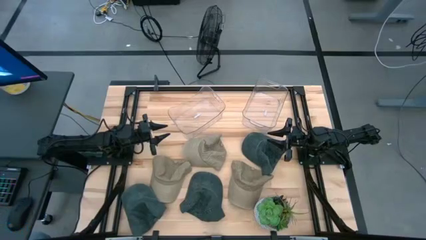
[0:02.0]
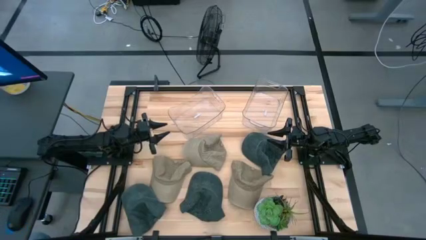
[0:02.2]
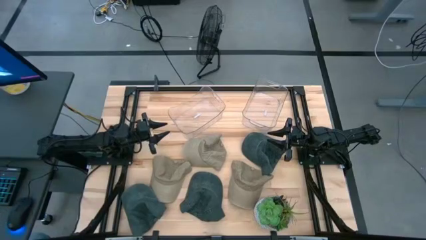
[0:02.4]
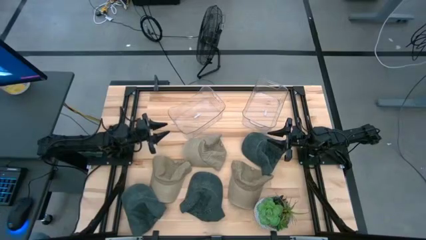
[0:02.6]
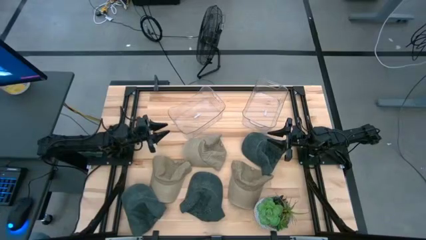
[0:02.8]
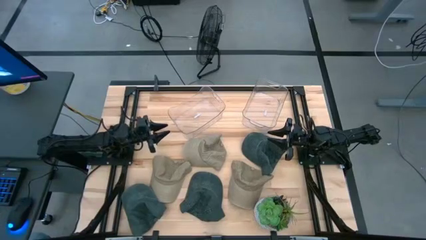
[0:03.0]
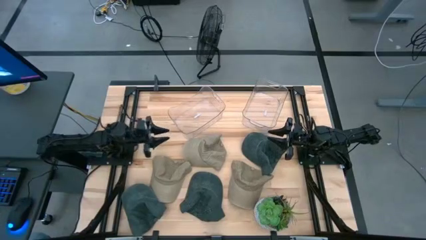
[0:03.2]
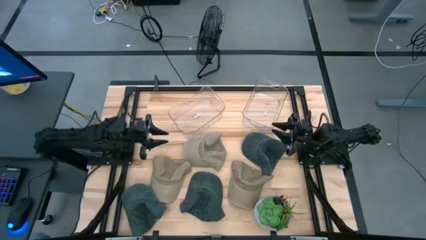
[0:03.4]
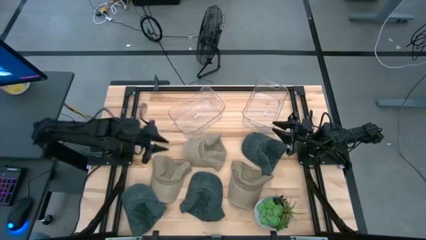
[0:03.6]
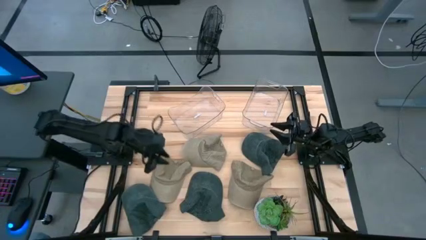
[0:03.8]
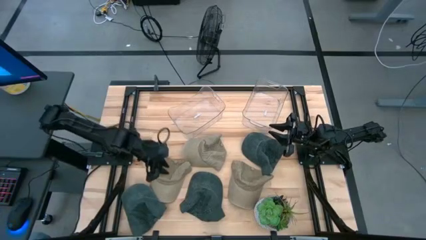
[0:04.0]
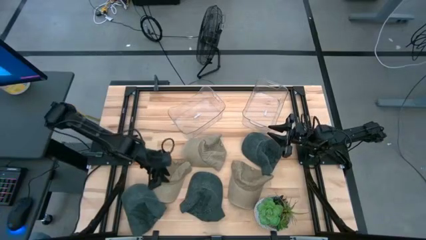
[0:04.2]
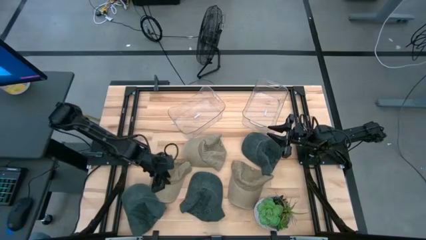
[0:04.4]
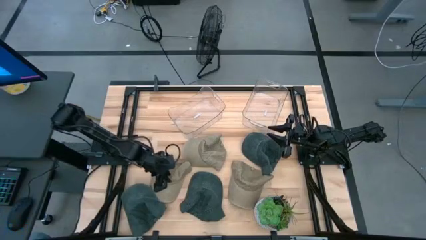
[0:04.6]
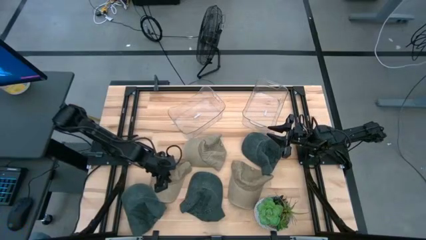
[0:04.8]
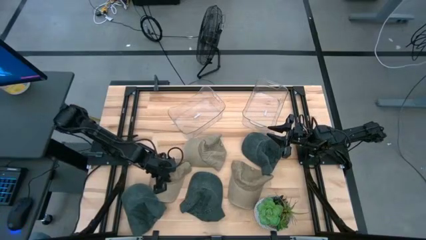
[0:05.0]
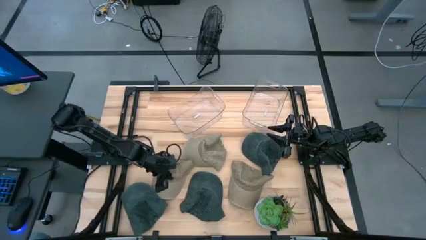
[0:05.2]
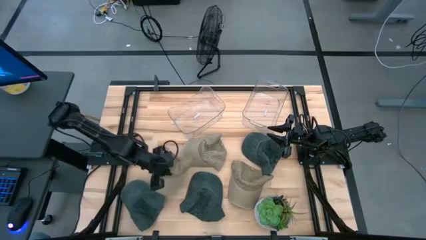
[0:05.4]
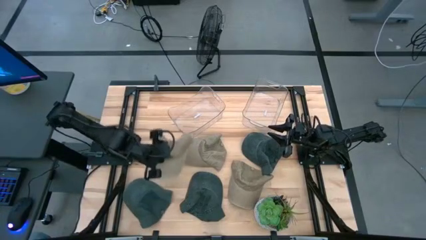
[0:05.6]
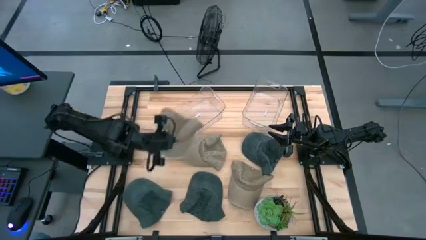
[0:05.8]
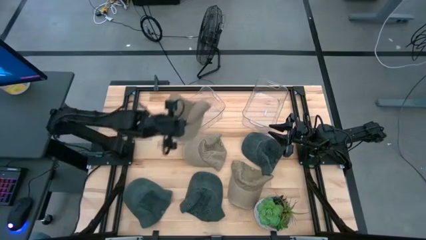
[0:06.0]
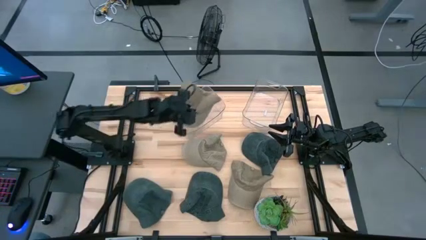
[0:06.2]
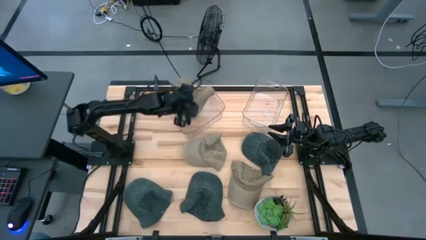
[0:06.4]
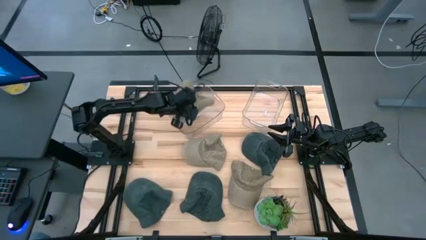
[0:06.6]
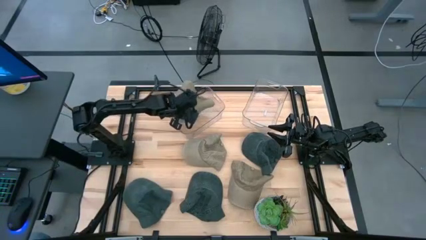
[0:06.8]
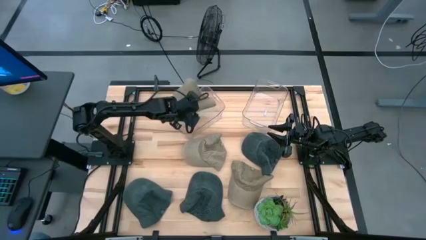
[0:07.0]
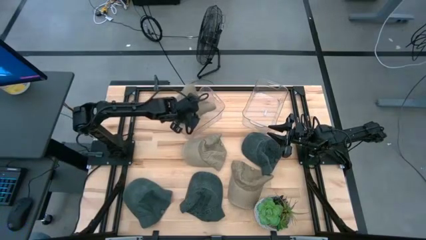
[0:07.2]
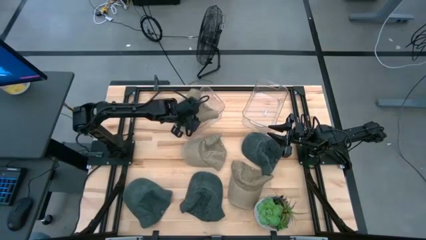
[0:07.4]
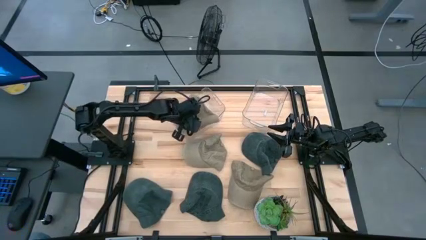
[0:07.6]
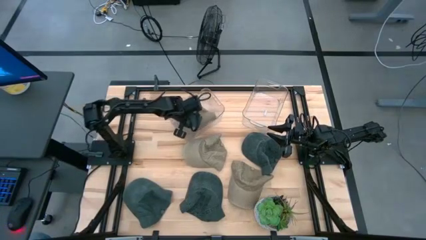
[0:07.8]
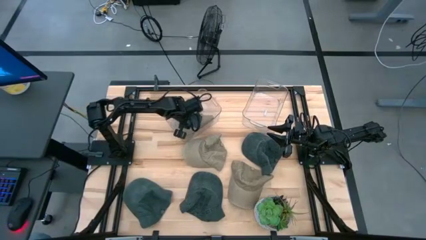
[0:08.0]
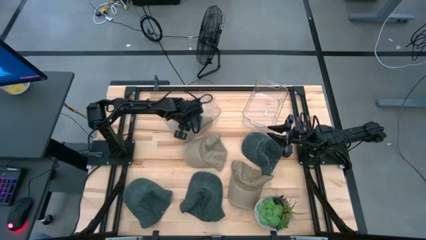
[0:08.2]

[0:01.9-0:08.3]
Task: Pick & Place hat
Put the bottom left brown cap into the left transparent bin

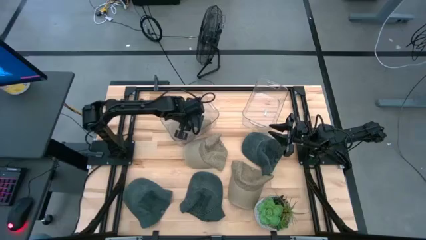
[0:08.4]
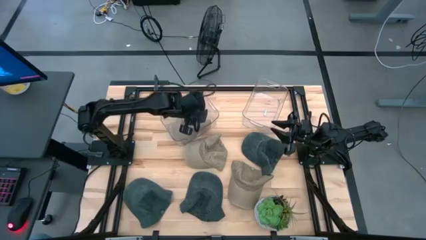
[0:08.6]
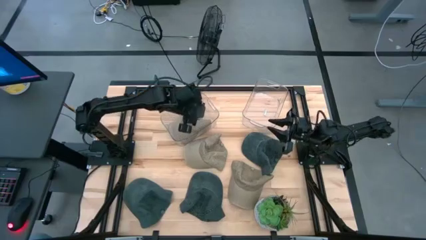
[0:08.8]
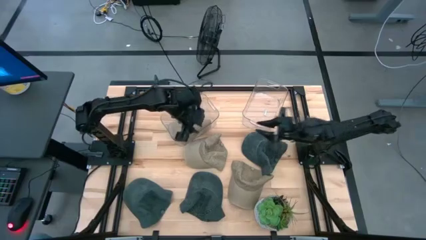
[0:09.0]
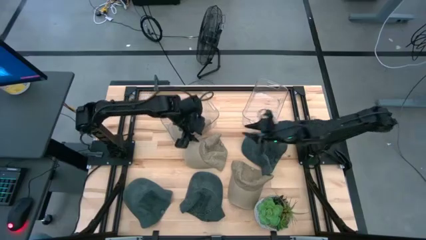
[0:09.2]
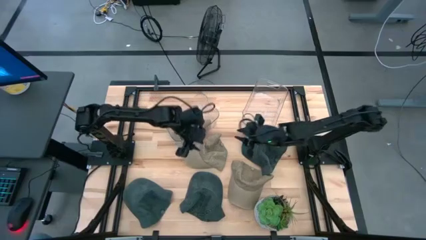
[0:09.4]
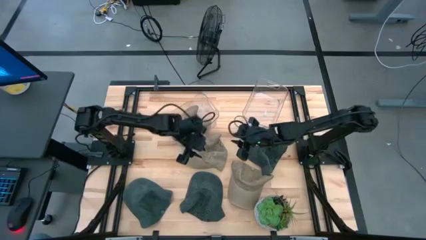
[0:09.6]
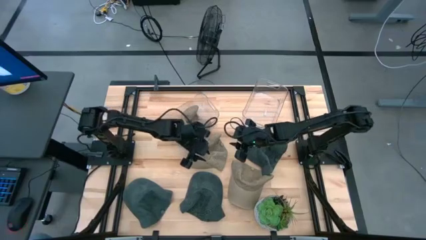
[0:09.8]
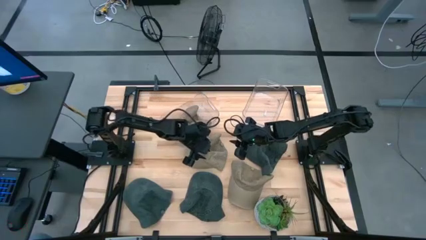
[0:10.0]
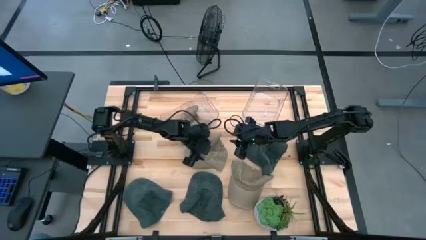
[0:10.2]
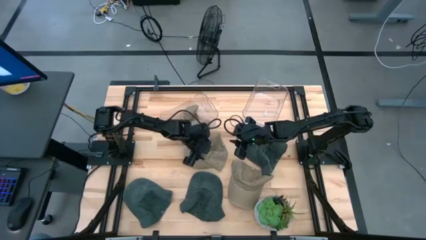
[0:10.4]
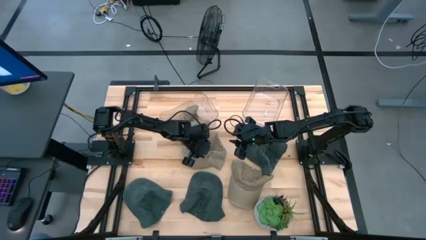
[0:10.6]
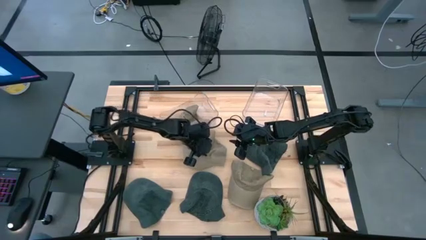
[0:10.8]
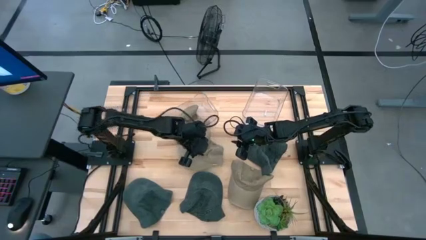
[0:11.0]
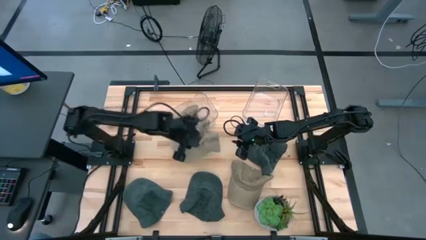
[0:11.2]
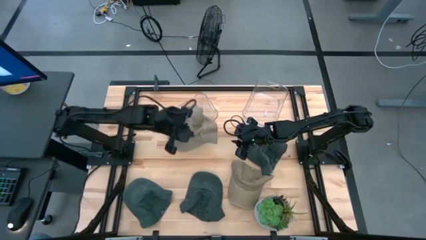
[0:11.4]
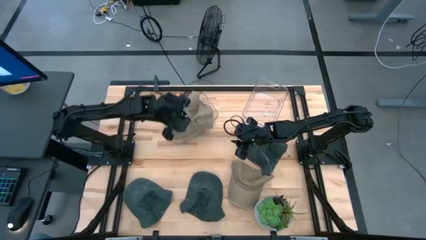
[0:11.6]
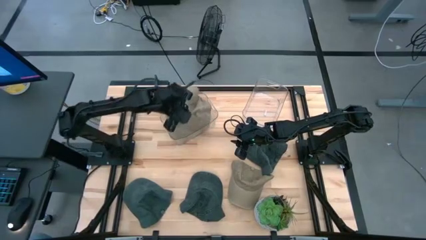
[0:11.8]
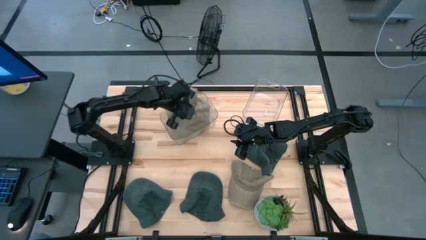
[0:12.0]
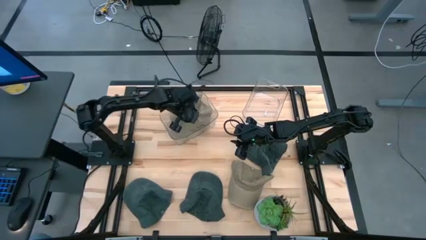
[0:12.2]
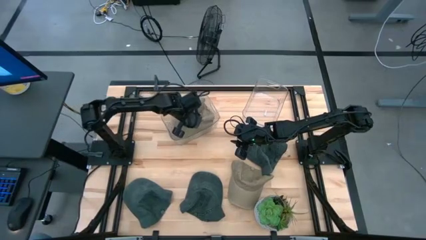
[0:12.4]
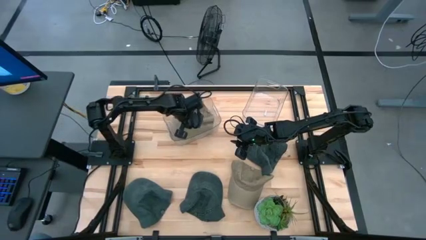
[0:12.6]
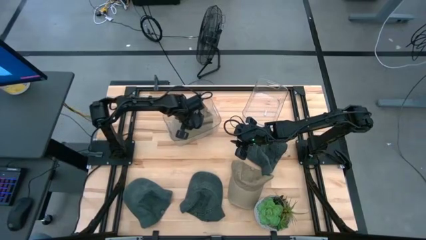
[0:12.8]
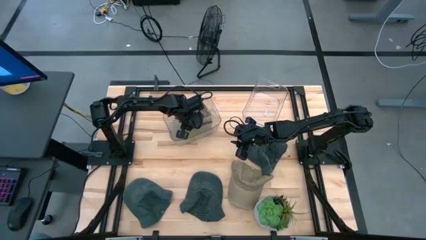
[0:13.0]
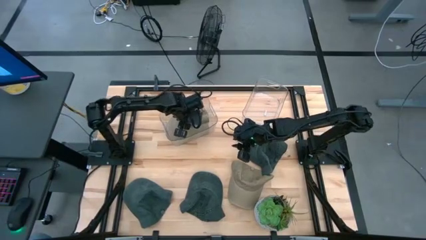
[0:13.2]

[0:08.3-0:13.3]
Put the top brown cap into the left transparent bin

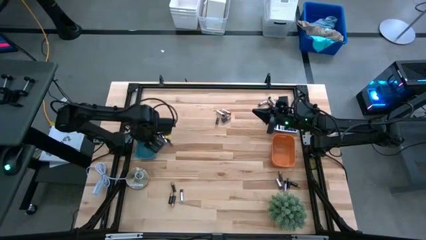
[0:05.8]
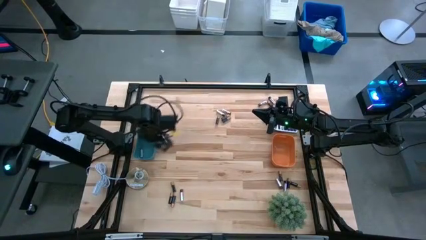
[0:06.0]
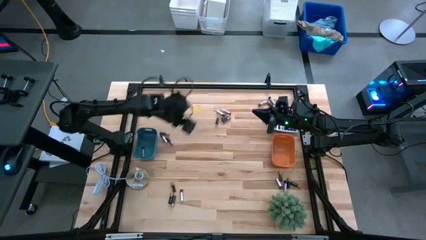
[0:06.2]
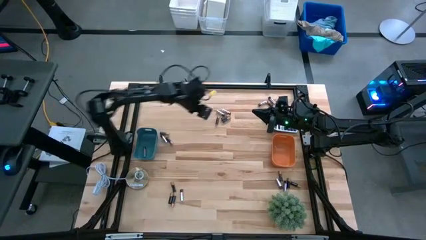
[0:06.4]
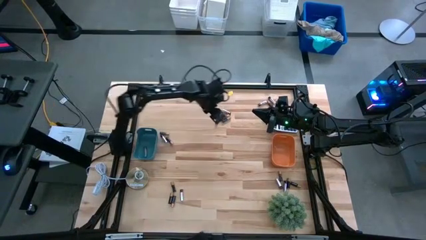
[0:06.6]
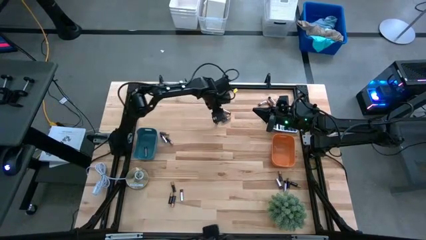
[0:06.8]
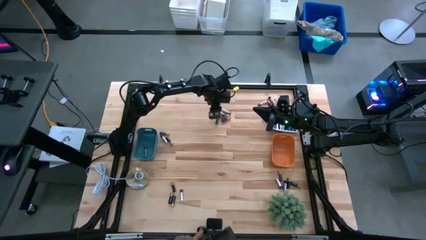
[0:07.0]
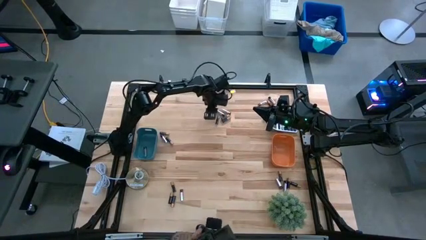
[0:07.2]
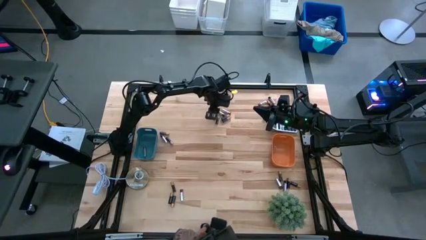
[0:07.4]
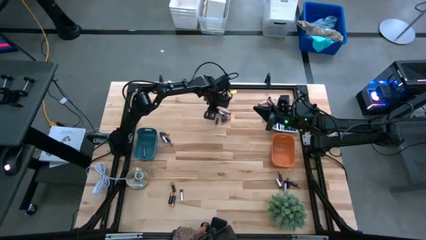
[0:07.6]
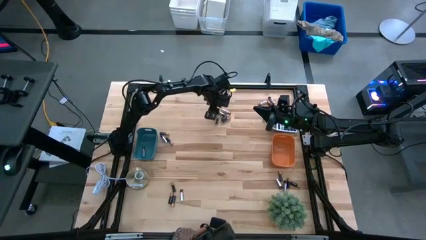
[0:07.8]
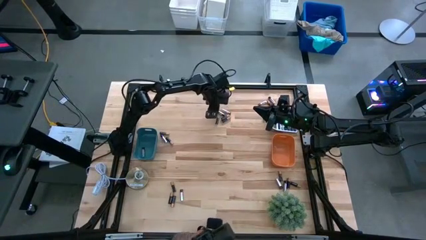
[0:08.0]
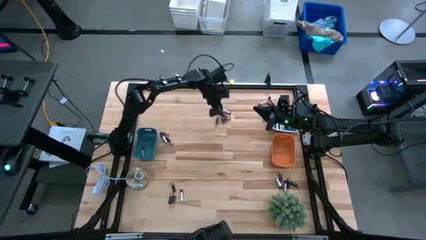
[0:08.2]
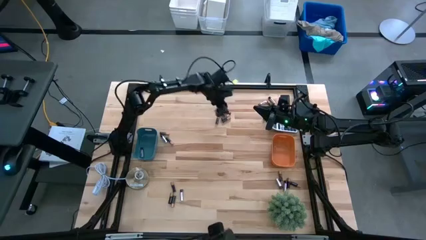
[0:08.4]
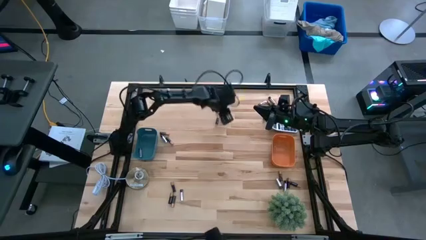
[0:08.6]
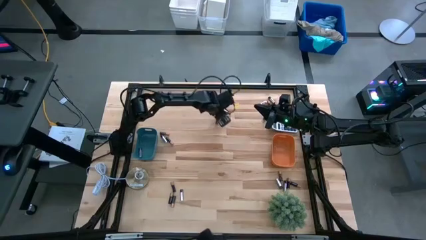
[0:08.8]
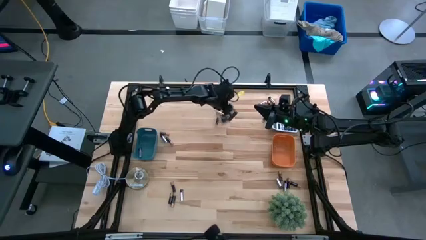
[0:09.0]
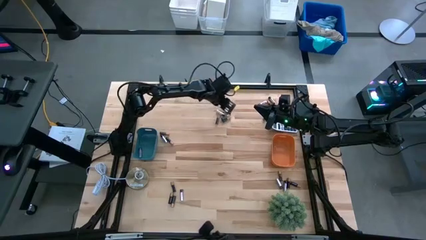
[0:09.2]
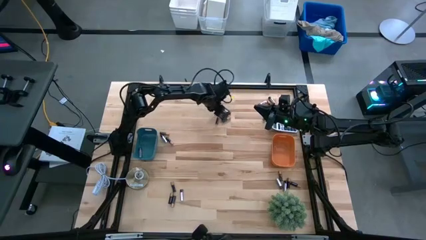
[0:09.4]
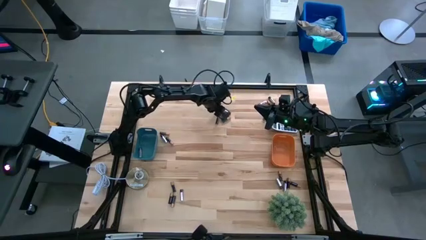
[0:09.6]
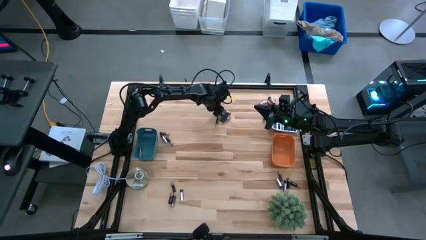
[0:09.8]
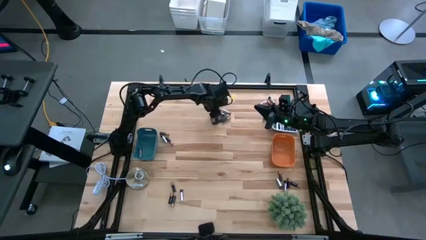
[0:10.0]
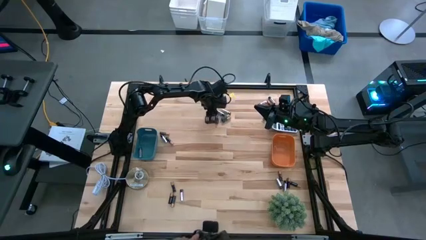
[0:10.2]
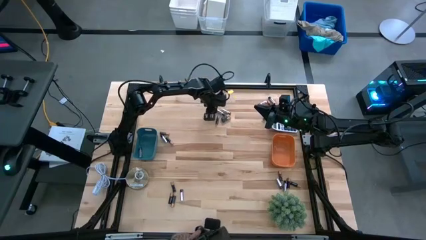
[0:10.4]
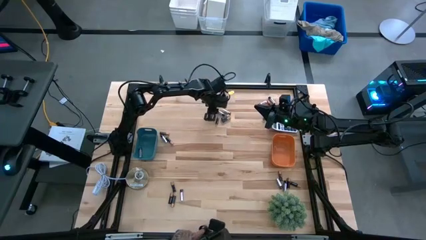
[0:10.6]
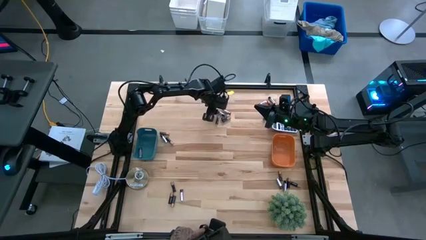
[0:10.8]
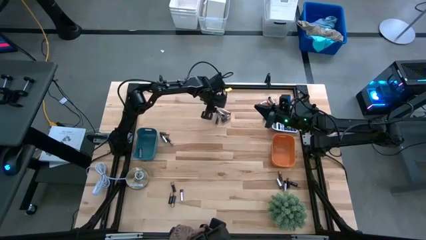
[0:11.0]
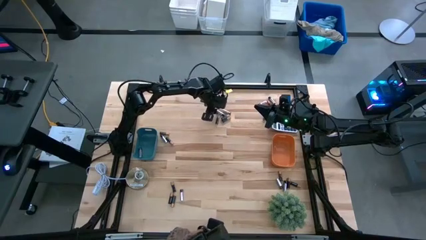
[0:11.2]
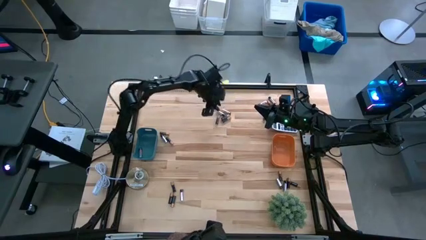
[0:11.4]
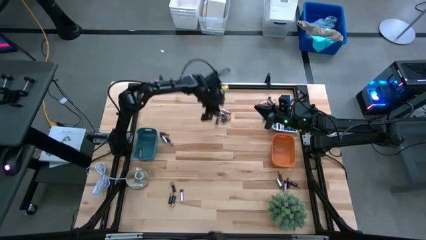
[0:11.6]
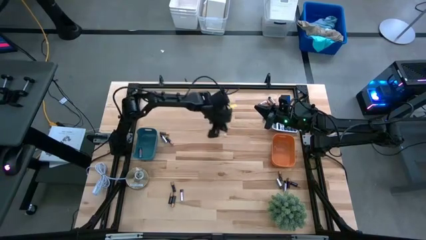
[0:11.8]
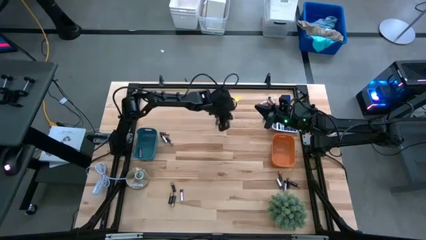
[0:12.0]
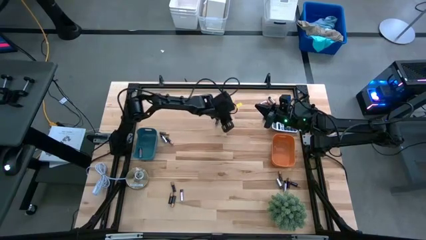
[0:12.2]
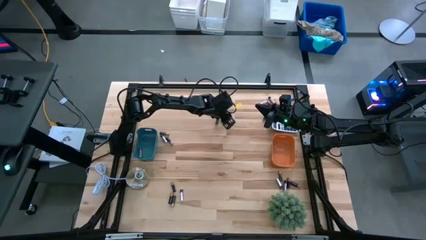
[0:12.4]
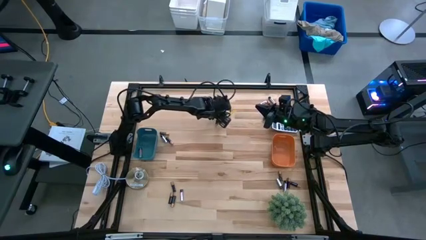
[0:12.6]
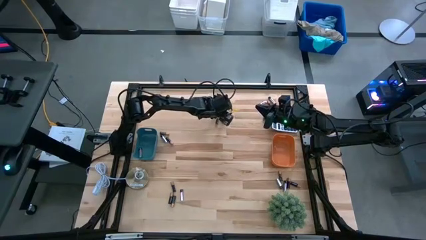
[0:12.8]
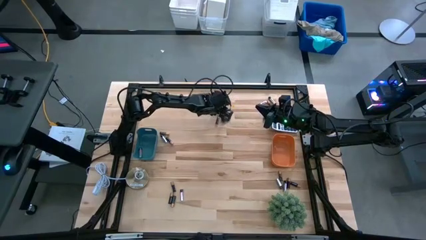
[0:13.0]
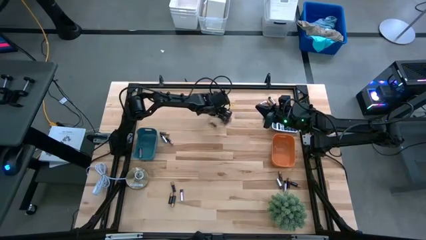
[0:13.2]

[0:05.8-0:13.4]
Task: Sort batteries
Put the silver battery into the blue bin
